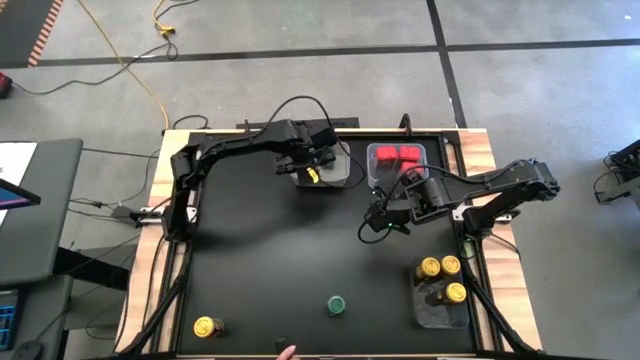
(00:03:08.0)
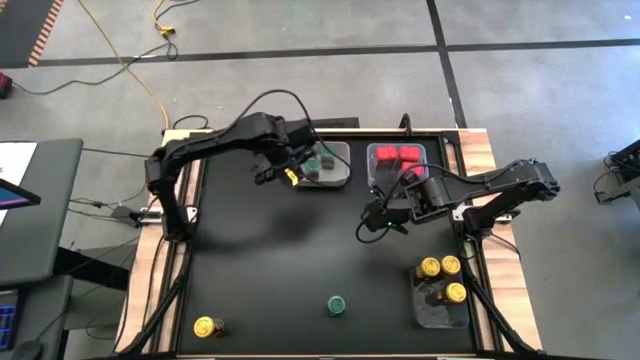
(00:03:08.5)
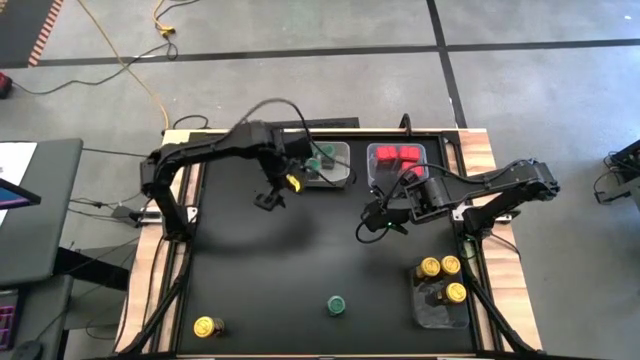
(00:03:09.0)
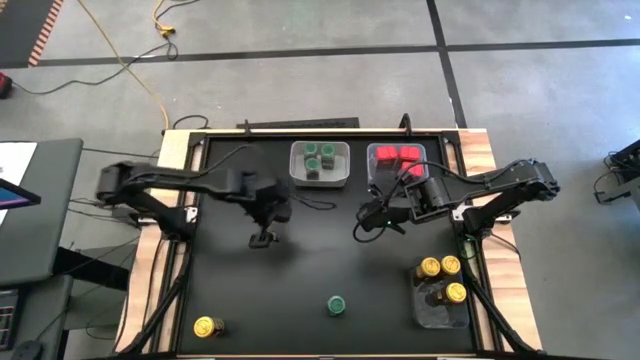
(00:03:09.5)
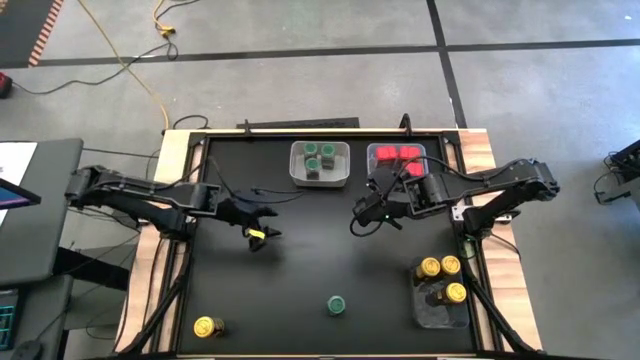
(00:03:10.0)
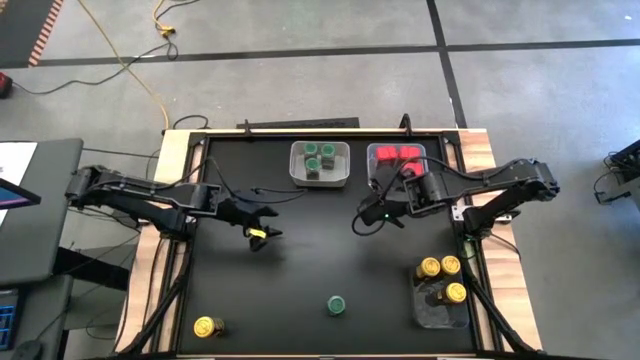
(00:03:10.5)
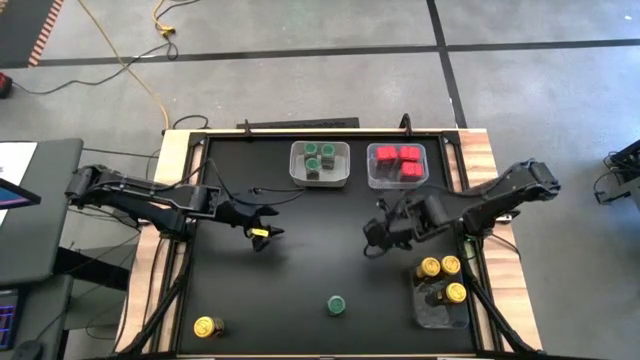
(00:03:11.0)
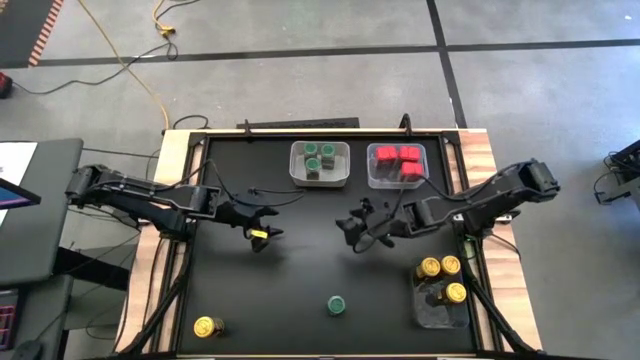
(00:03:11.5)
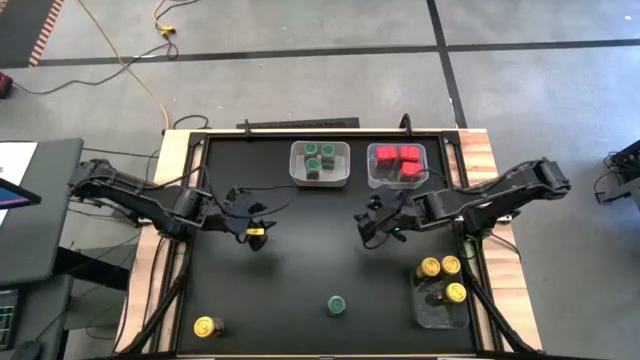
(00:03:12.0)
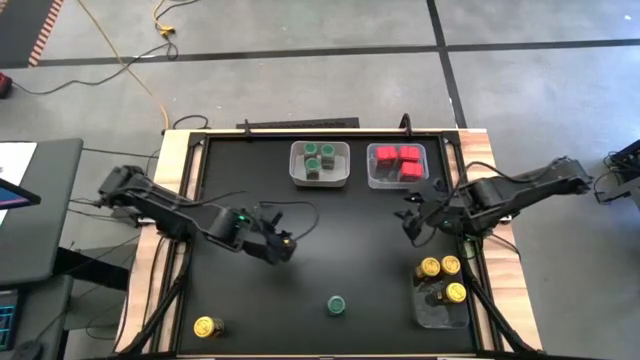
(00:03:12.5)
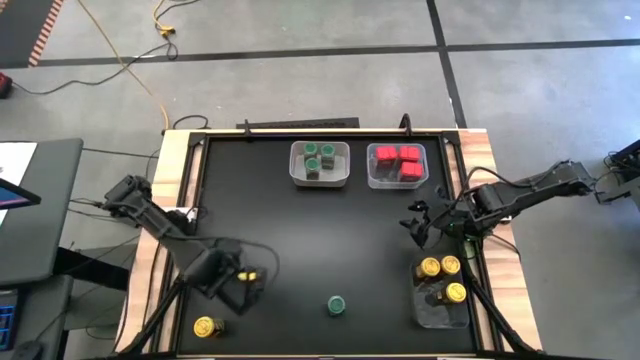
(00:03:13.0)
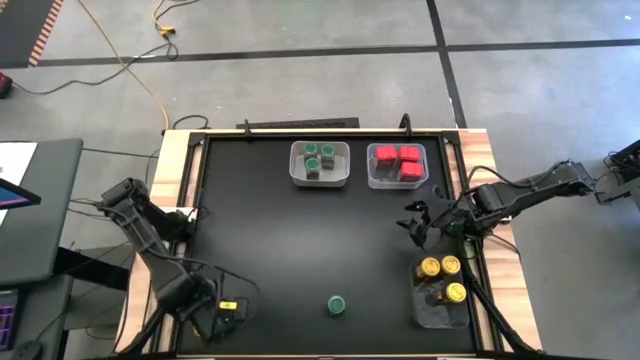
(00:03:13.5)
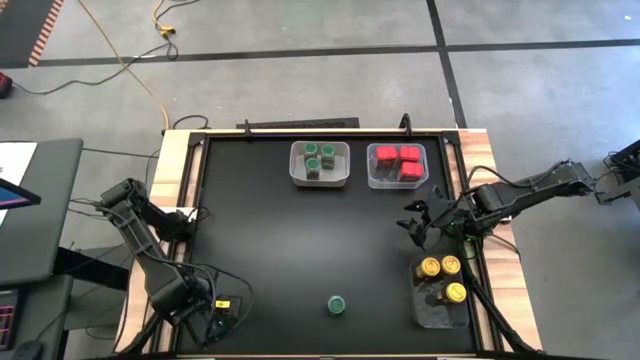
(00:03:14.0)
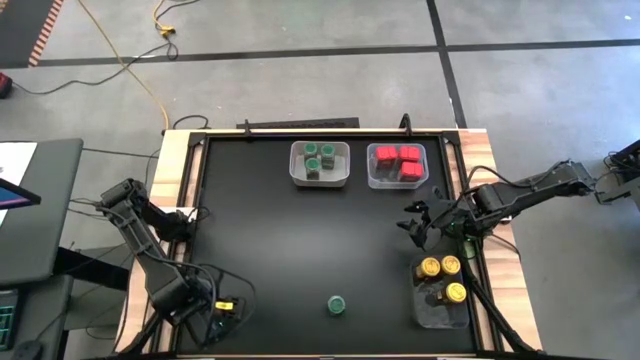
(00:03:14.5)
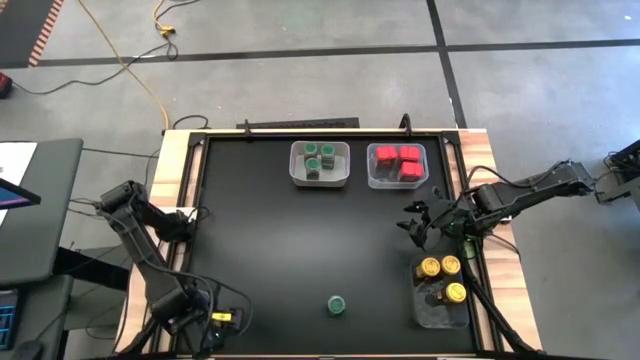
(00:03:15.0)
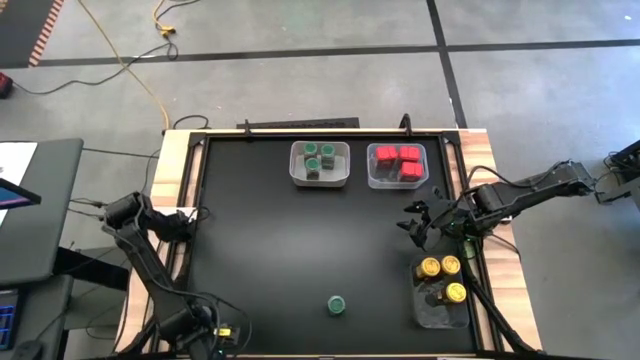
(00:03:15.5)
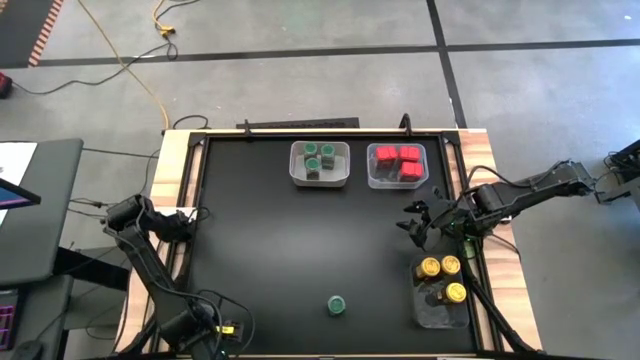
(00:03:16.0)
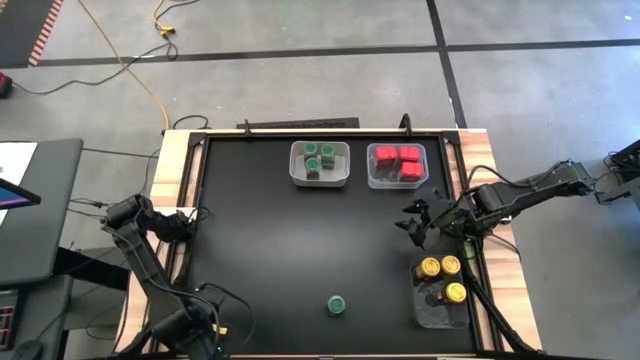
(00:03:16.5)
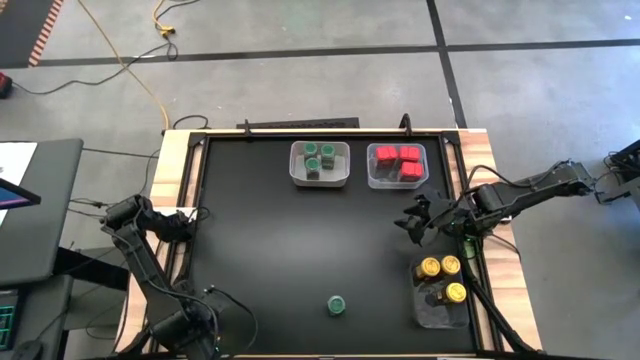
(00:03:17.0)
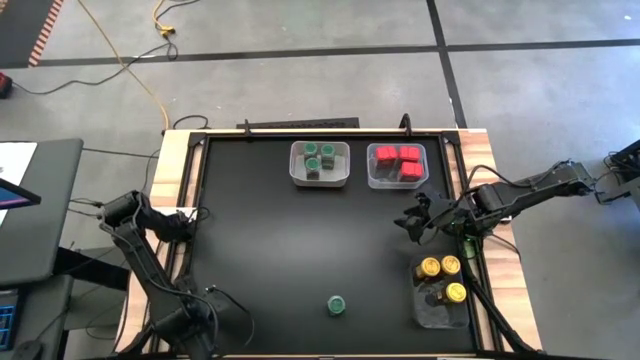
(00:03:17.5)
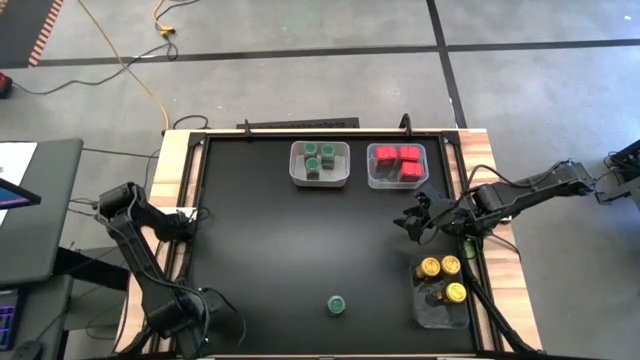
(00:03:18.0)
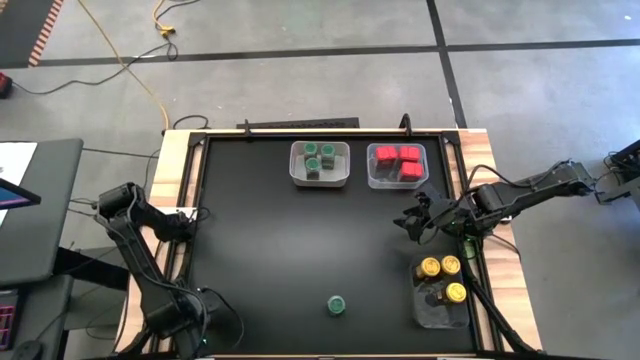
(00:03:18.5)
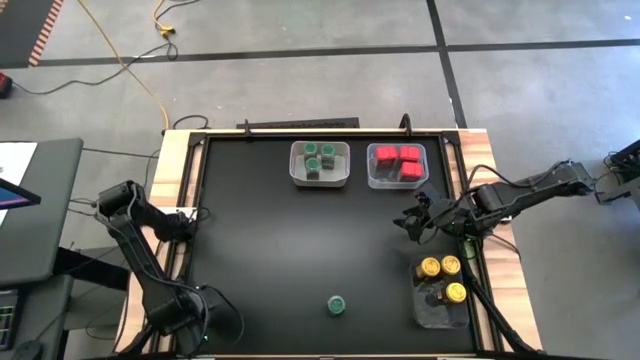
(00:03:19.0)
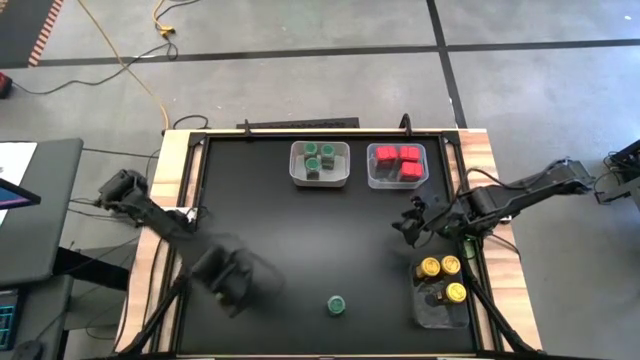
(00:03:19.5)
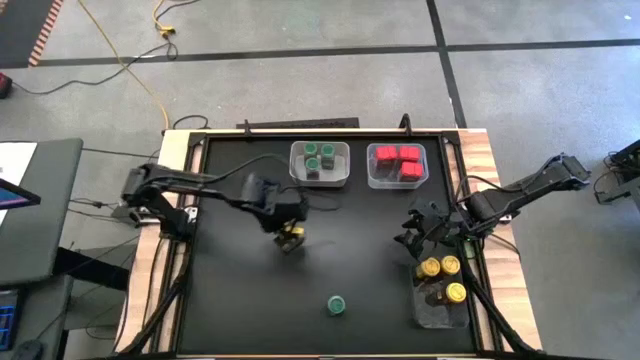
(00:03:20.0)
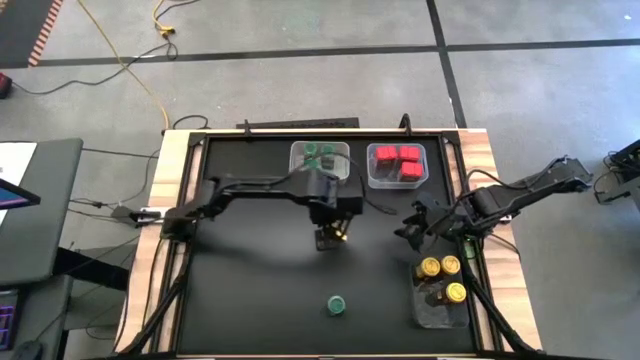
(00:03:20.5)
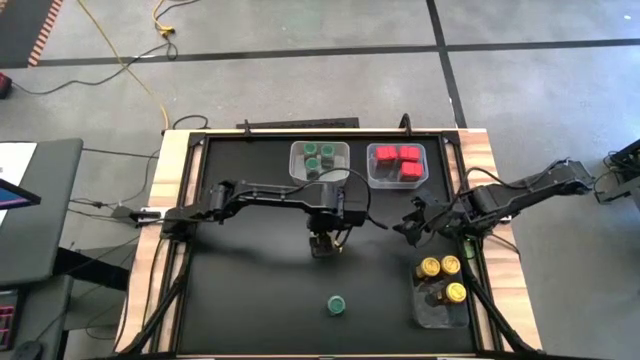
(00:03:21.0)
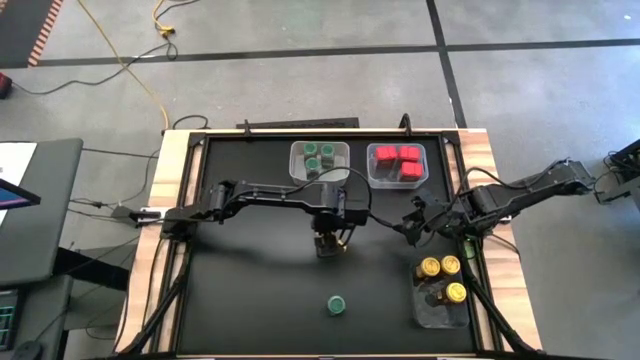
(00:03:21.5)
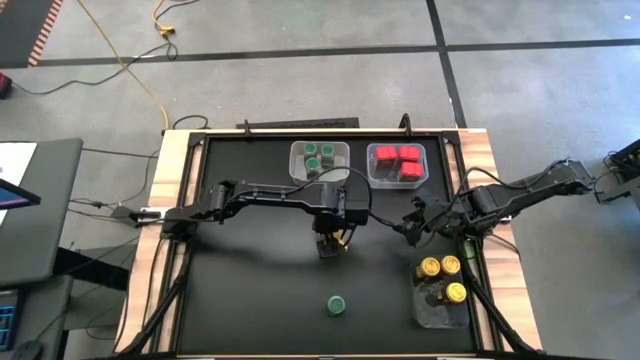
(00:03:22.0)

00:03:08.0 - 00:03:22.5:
Task: Sort spices by type
Put the yellow seasoning bottle into the black bin

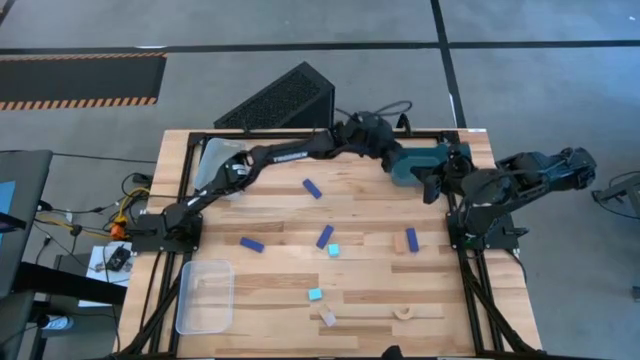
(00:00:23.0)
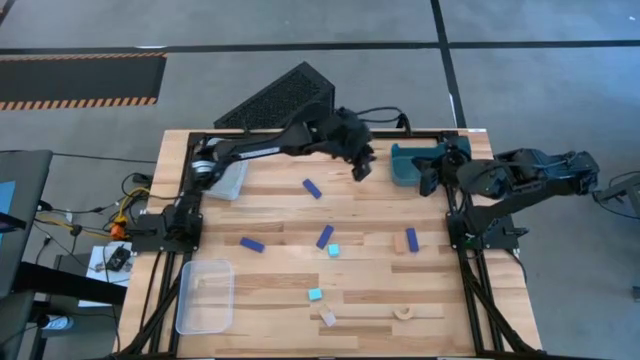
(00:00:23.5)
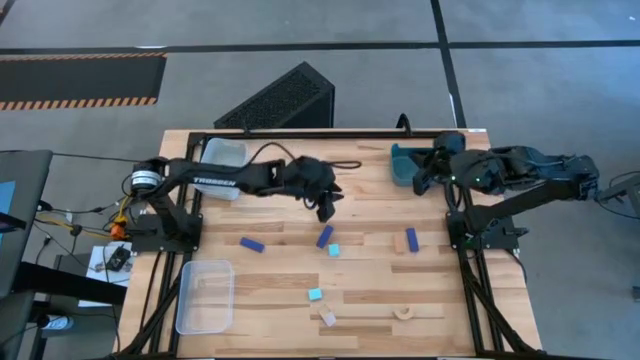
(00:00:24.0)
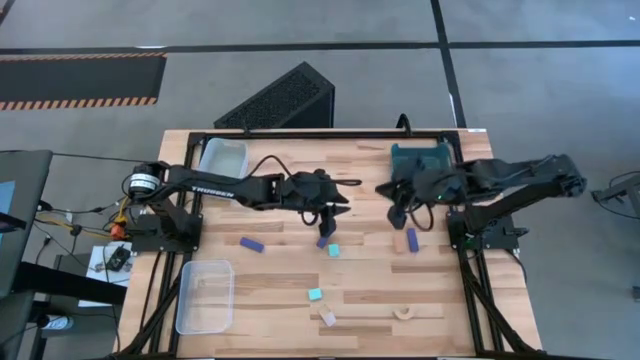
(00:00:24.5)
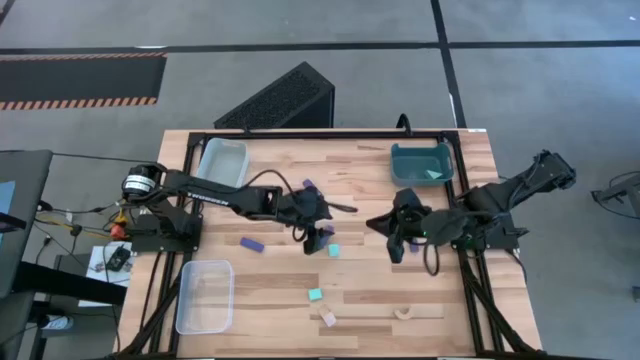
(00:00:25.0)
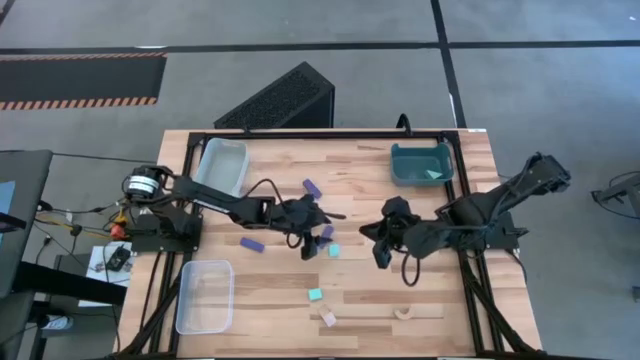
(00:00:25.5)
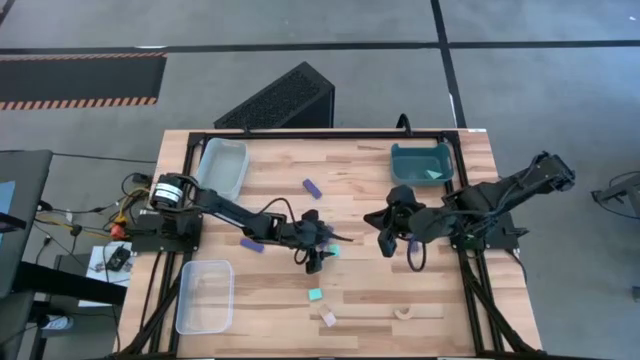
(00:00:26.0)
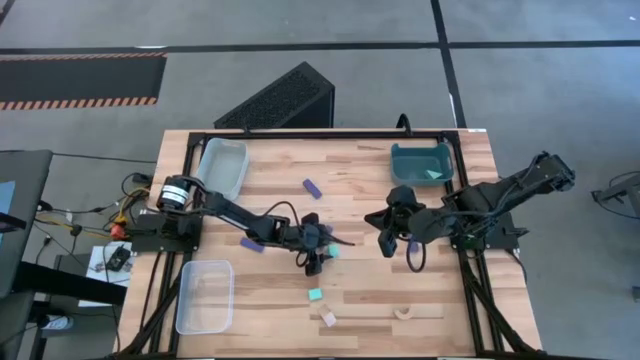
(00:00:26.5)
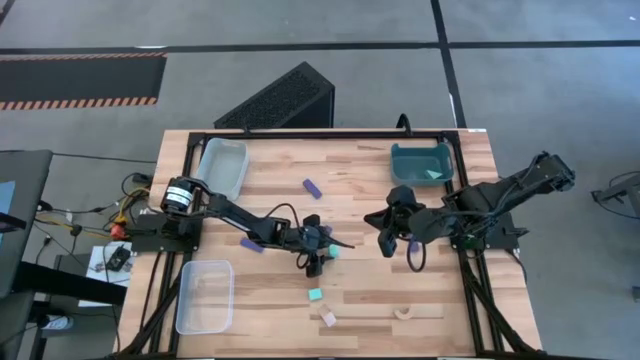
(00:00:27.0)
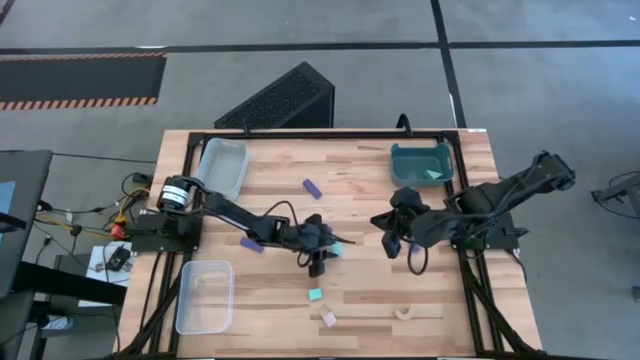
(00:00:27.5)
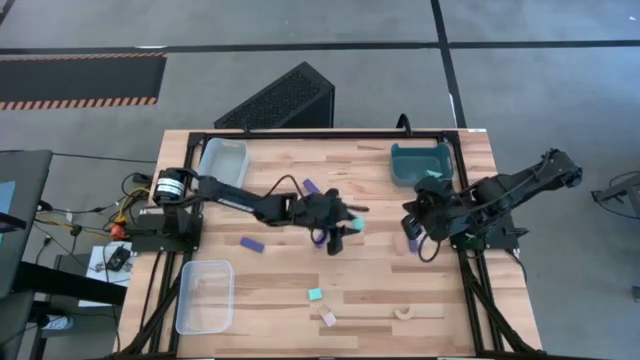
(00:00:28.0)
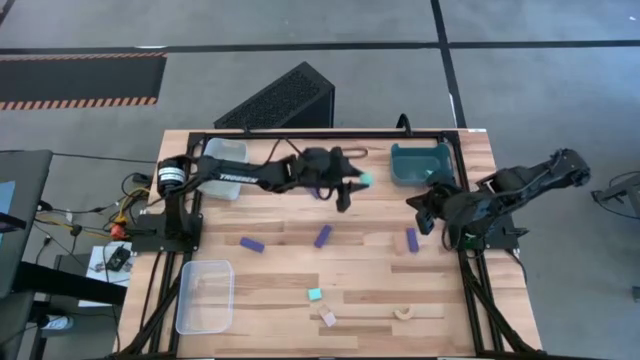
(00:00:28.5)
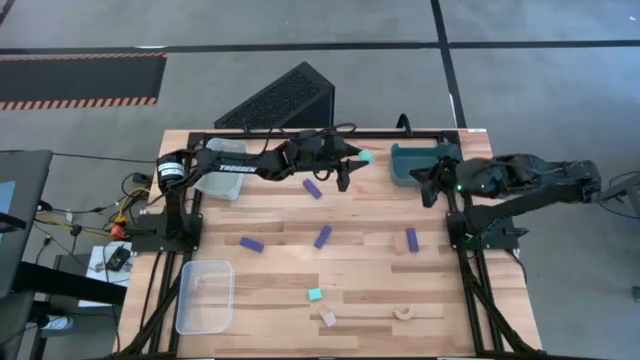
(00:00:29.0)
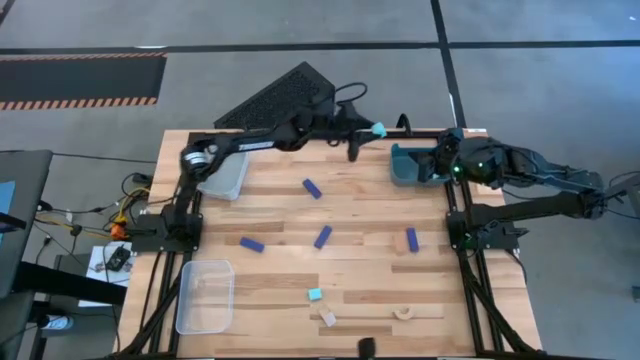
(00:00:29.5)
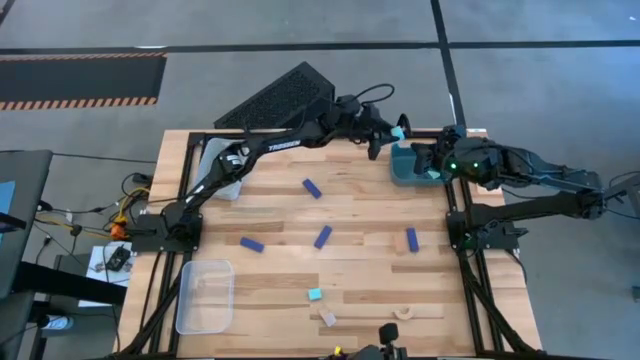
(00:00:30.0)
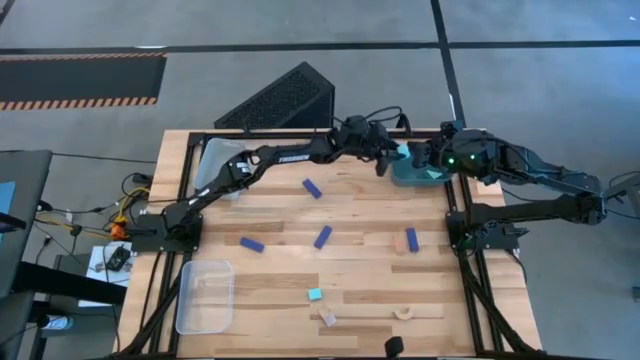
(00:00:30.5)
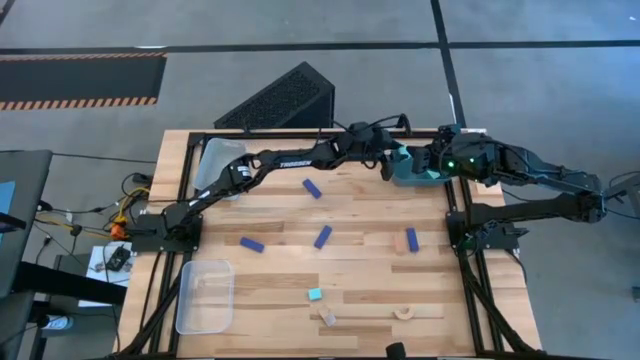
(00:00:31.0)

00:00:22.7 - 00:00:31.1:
Task: Sort & place blocks by color
Put the light blue block into the dark green bin
